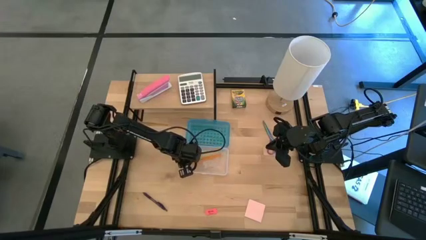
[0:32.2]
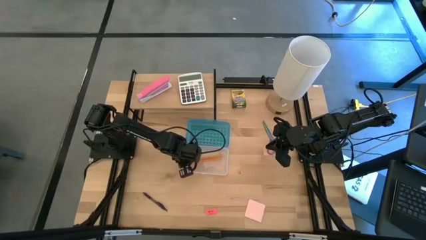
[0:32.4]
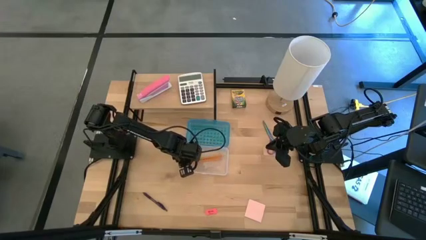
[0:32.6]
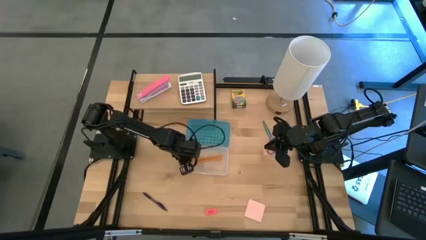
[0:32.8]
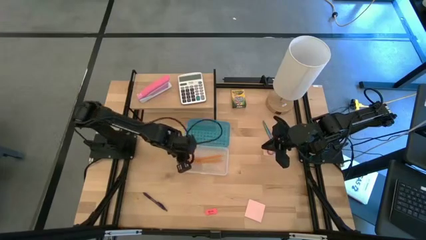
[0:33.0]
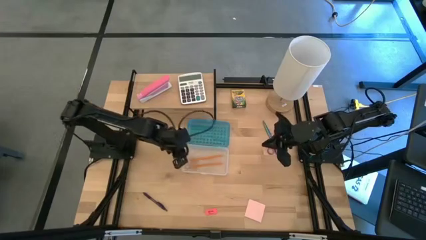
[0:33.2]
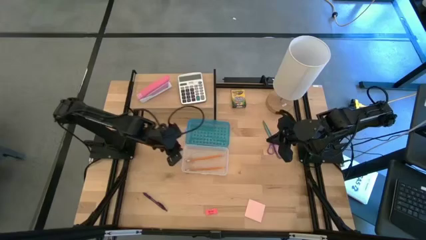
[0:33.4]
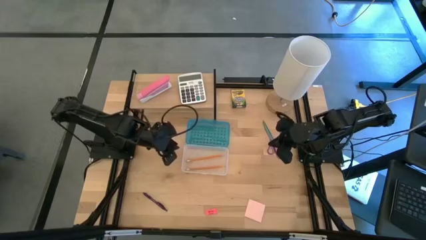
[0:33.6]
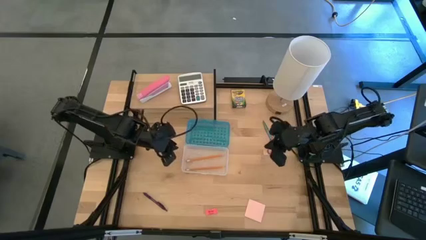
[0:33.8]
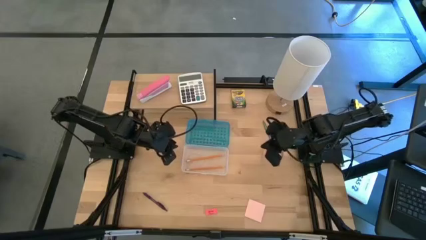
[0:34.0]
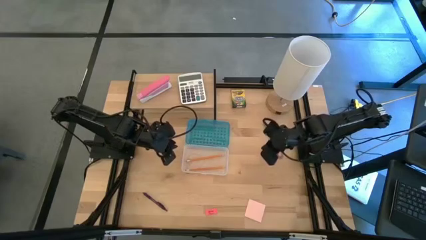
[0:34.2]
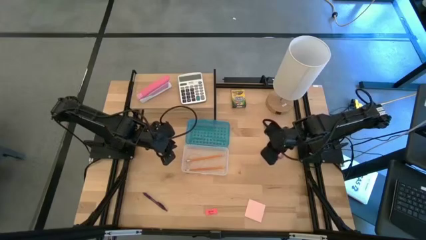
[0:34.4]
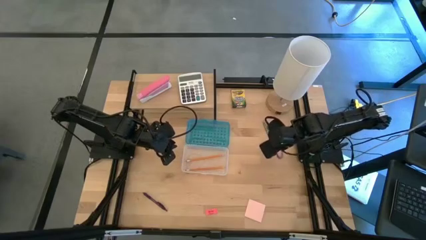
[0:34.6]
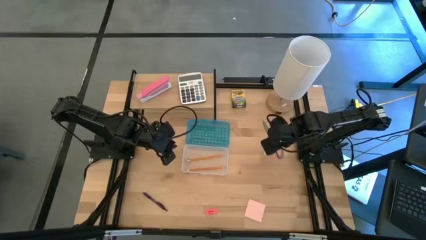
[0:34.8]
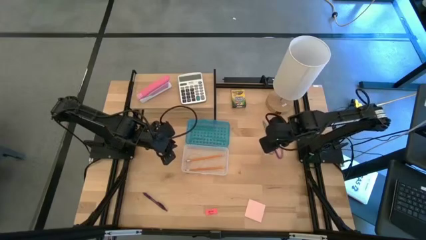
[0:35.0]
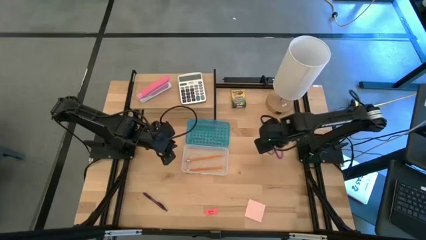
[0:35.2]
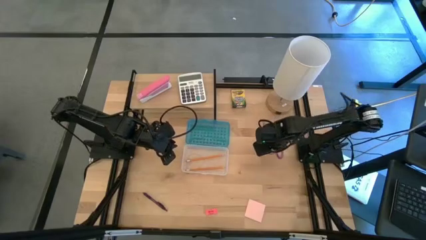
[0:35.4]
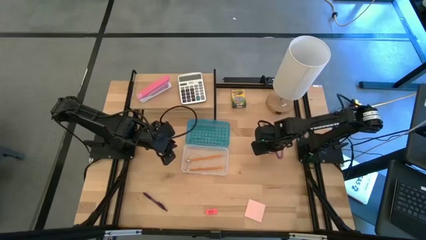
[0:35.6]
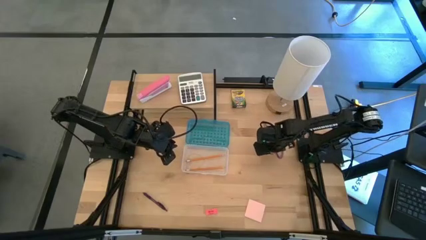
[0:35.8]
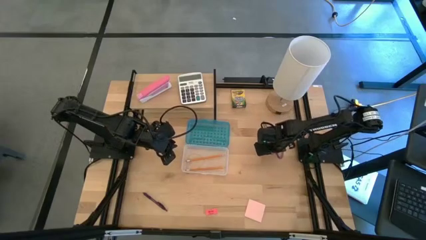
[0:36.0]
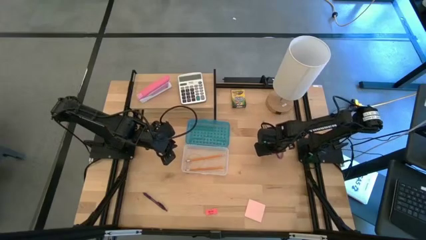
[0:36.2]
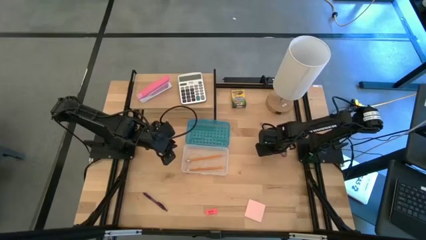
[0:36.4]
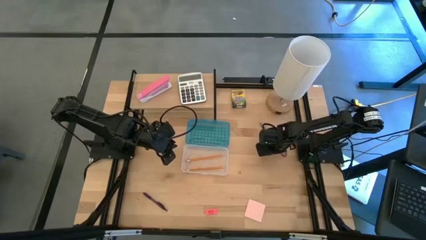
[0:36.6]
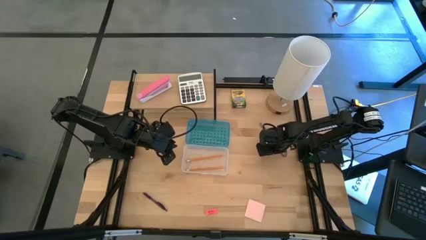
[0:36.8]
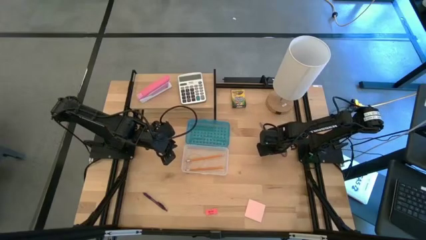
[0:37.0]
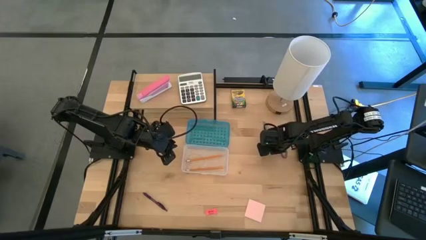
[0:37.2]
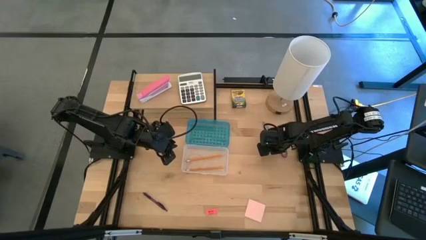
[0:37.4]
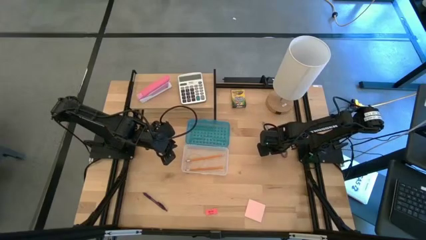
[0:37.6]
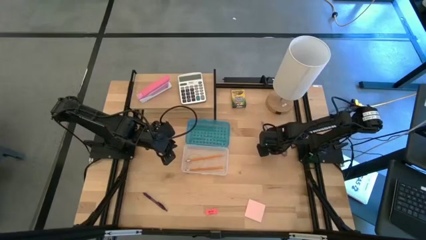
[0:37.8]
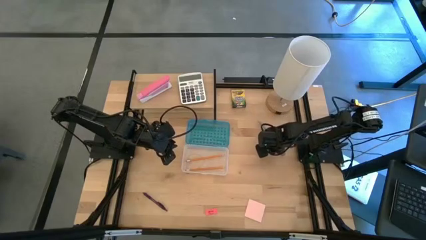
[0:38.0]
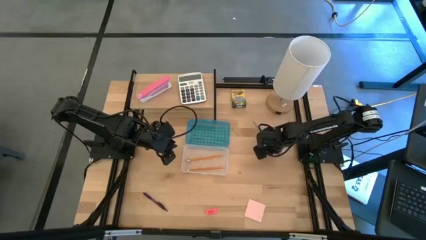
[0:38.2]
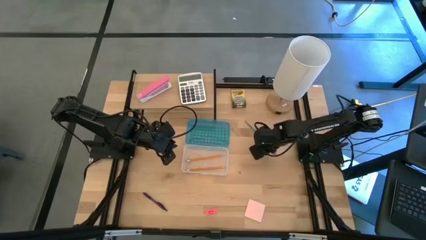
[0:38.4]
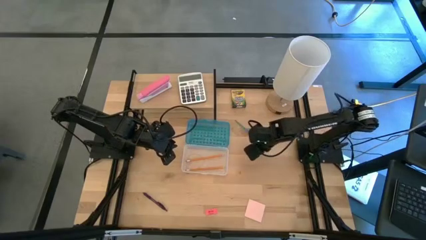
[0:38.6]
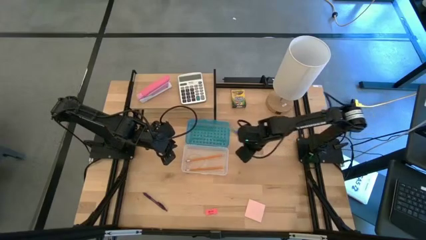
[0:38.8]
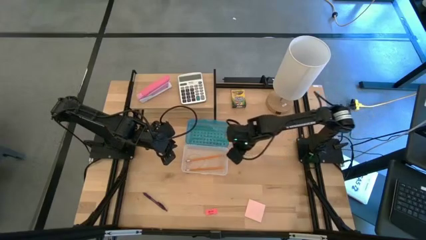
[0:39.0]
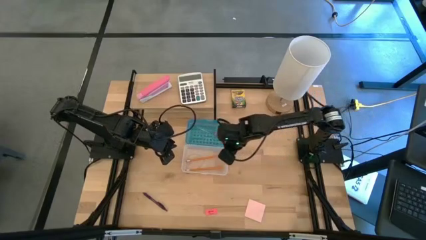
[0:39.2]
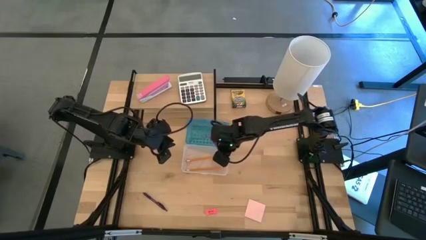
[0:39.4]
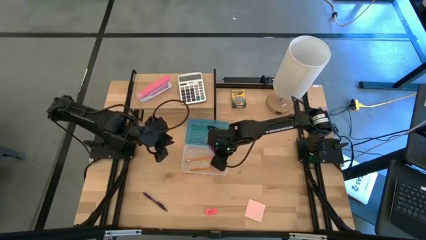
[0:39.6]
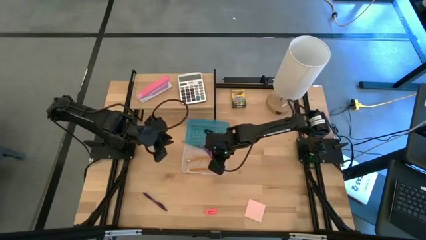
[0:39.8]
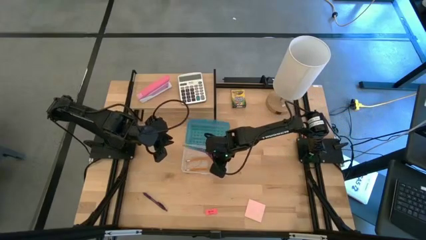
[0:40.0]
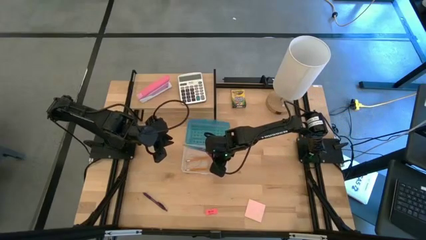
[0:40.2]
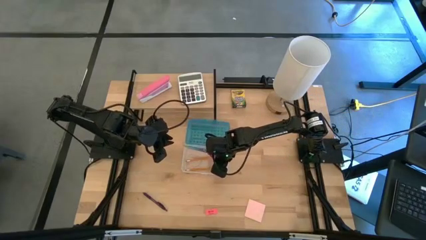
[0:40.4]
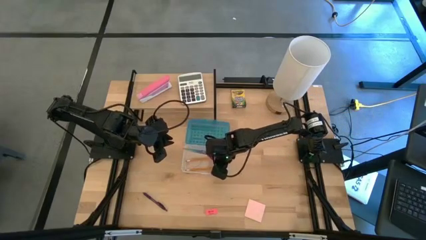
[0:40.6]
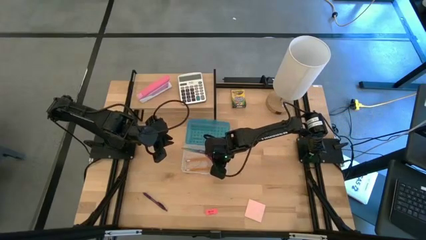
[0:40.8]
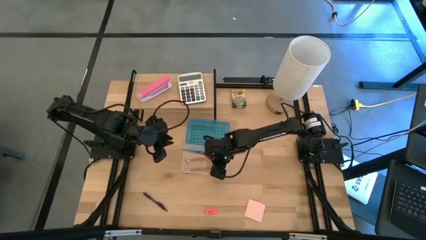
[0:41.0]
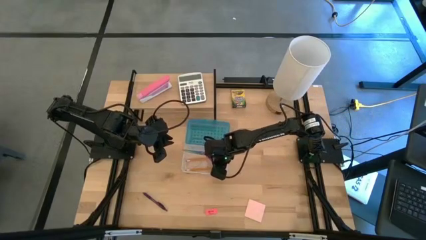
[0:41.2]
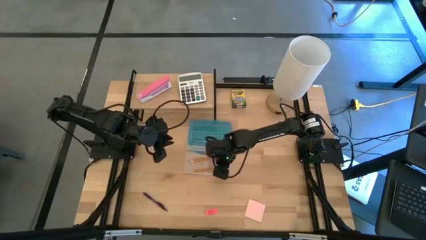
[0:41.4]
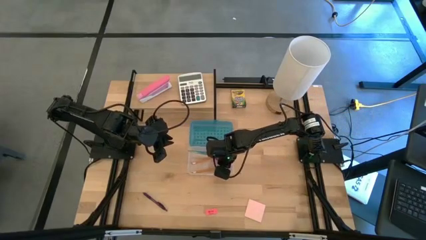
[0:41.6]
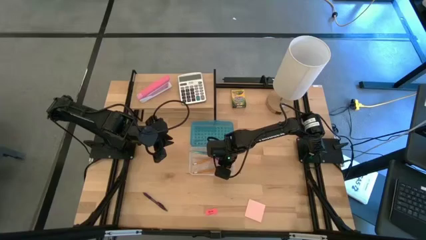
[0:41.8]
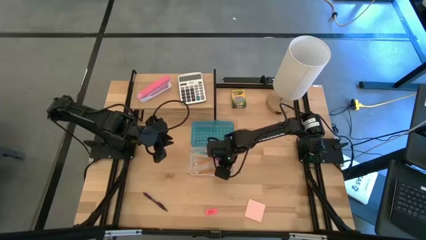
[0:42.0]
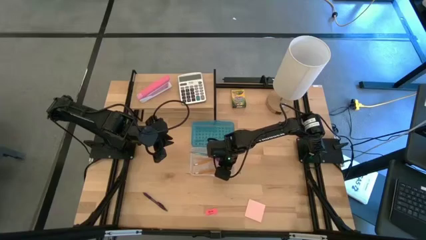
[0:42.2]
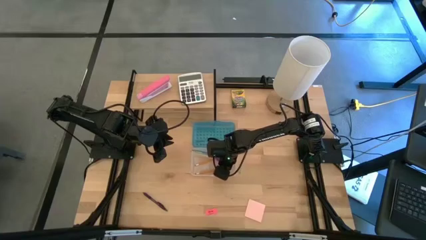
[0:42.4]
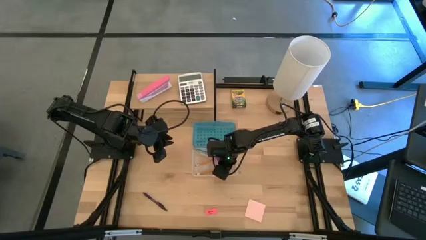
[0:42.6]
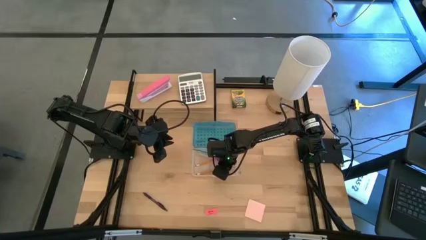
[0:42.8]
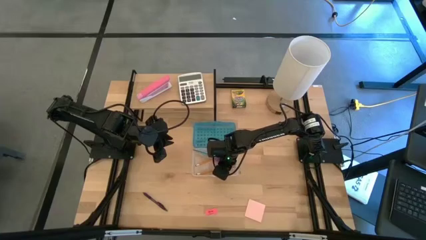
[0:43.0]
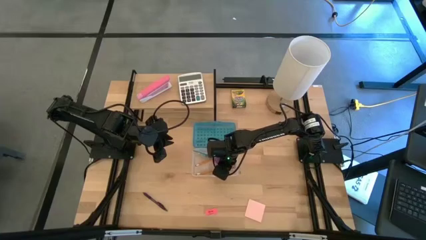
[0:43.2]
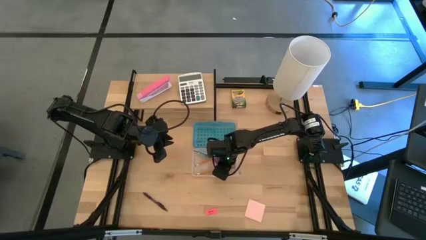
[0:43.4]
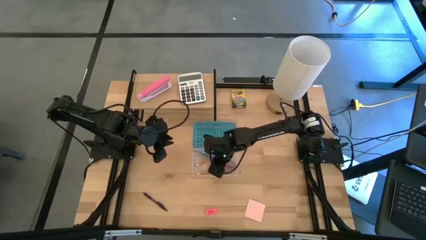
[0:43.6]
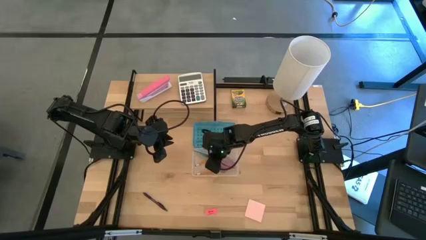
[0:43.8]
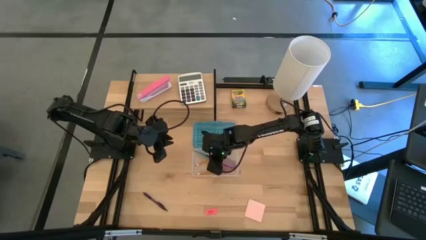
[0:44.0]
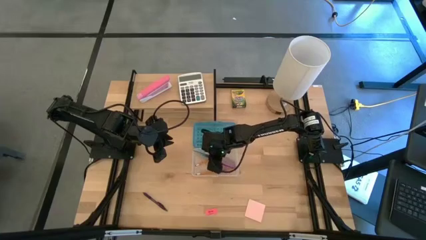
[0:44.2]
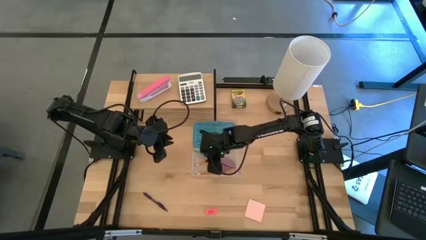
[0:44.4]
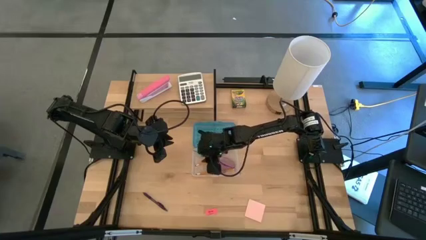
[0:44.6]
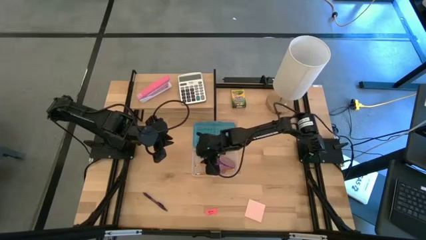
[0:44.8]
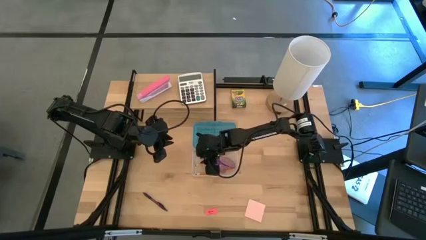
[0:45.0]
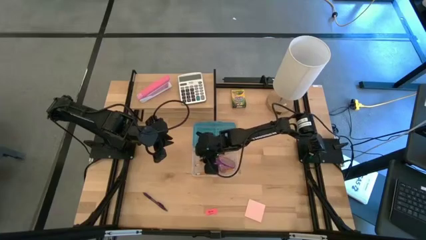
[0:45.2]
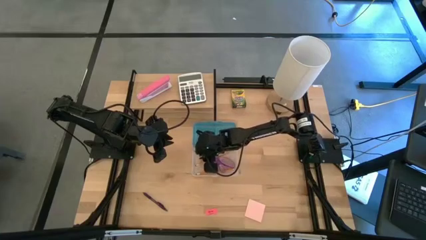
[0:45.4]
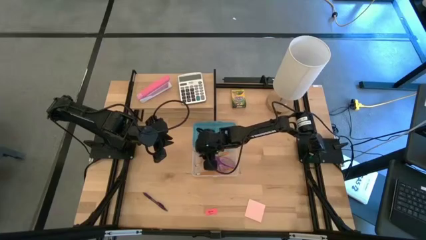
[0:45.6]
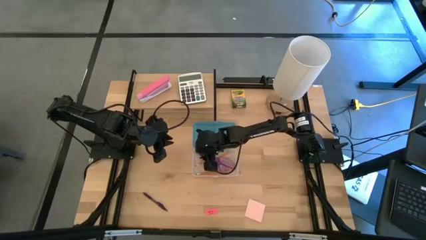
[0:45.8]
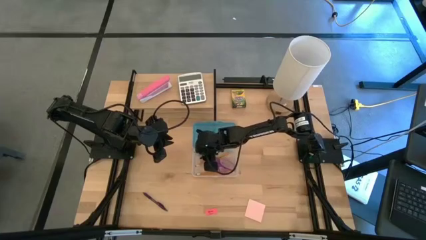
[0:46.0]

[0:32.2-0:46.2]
Task: Pack school essentials
Put the purple scissors into the blue supply box

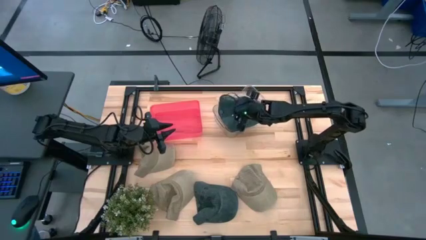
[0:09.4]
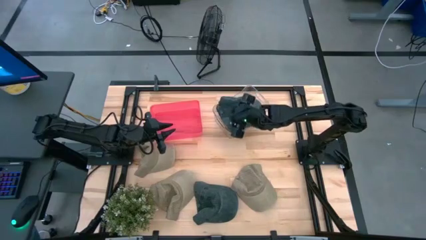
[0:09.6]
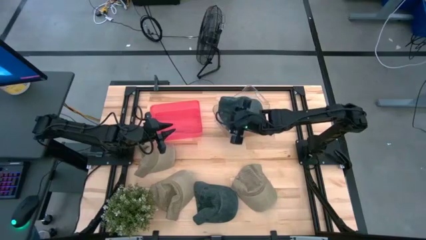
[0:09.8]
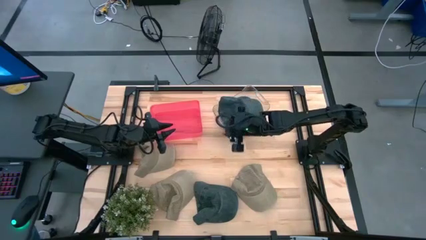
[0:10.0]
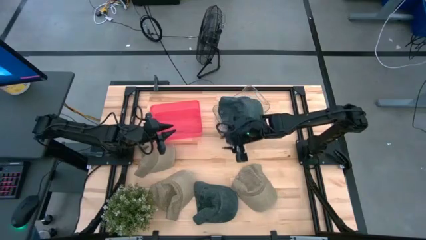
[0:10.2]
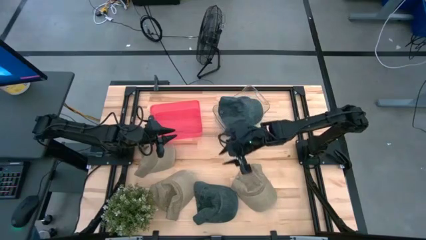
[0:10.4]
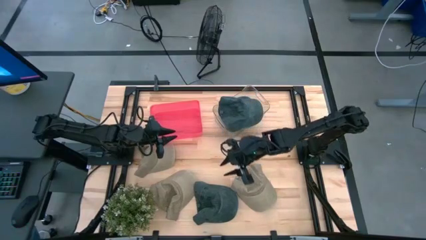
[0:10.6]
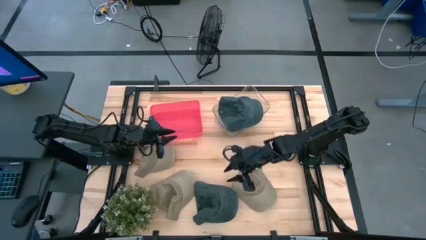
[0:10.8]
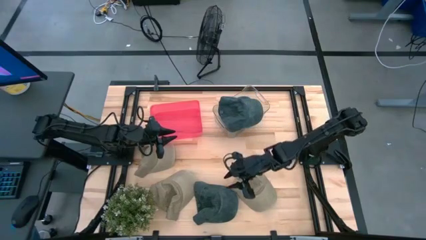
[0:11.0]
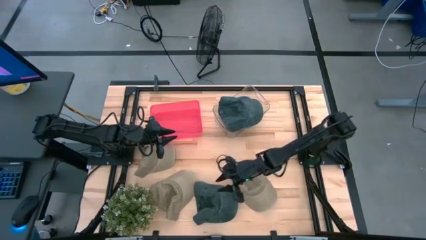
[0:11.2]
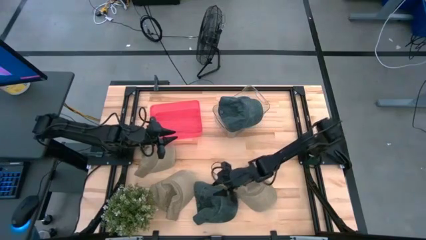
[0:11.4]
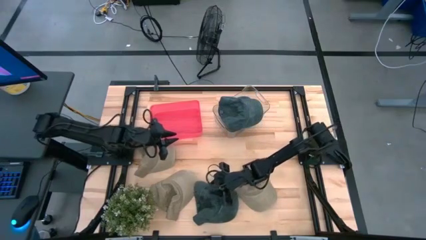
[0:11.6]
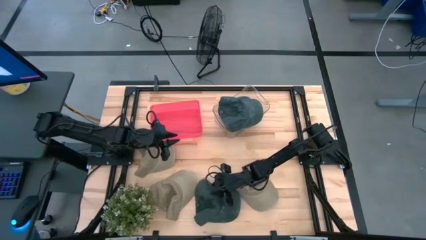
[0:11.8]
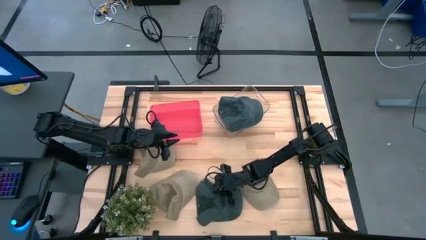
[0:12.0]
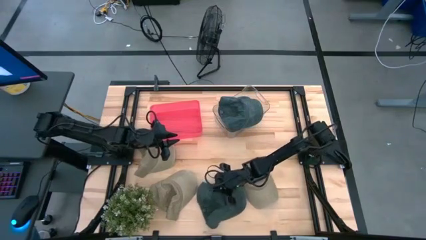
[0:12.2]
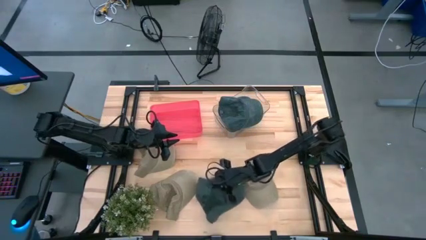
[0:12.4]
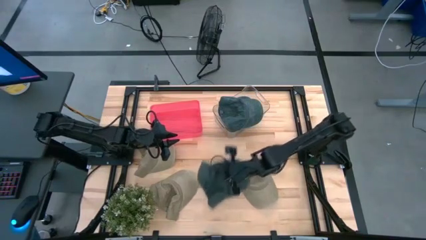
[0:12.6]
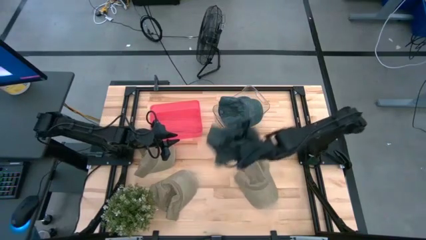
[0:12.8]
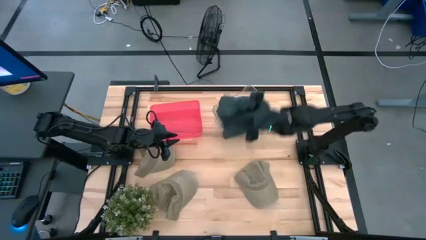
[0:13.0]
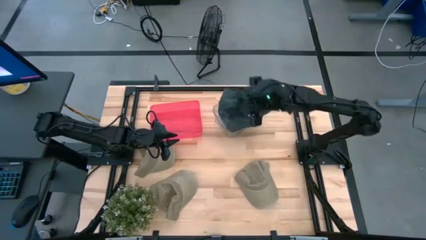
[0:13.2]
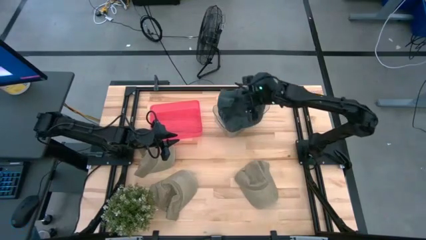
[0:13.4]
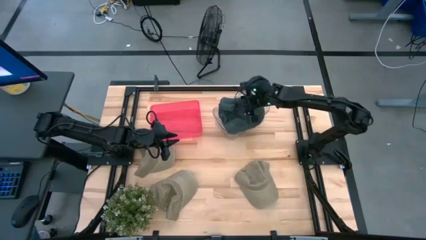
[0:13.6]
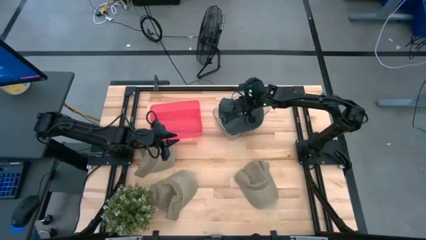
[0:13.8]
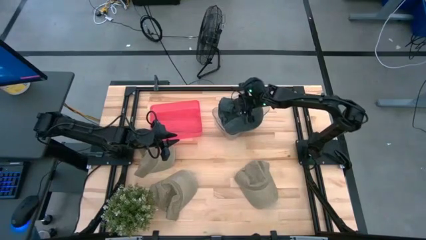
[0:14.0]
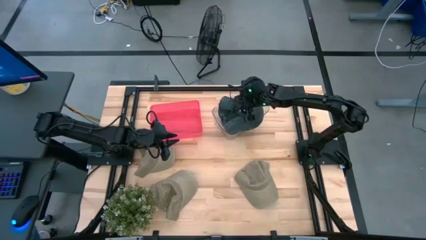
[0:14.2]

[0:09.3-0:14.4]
Task: Pick & Place hat
Put the blue cap into the transparent bin
